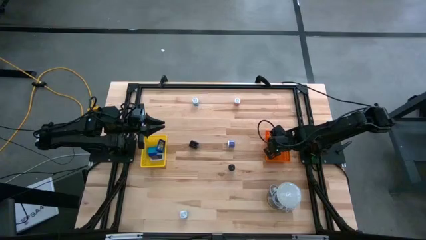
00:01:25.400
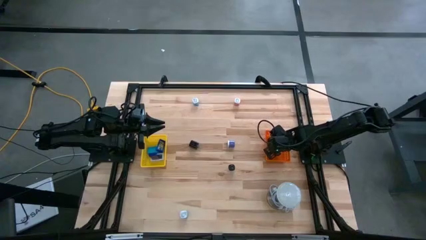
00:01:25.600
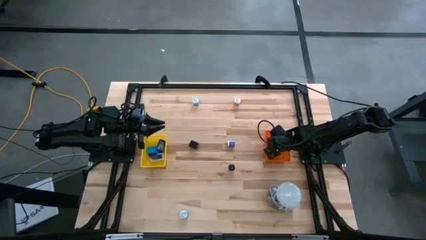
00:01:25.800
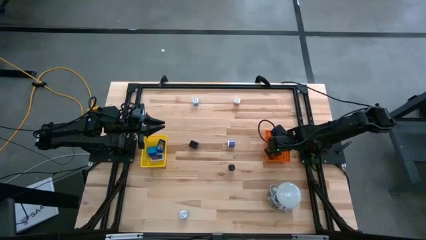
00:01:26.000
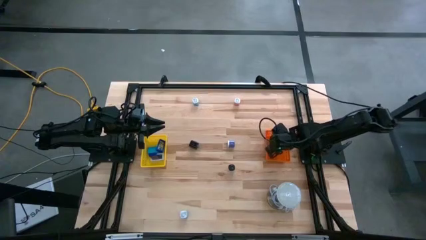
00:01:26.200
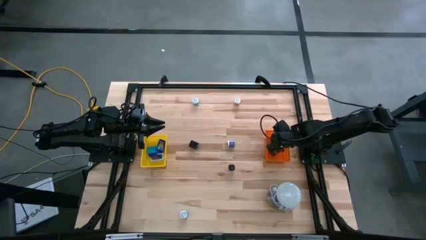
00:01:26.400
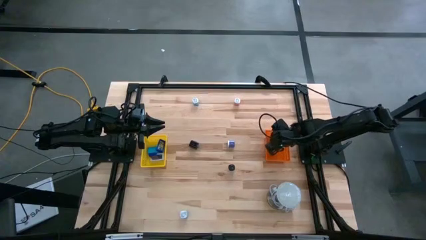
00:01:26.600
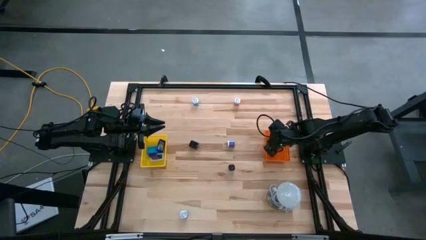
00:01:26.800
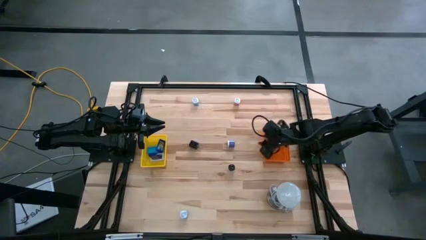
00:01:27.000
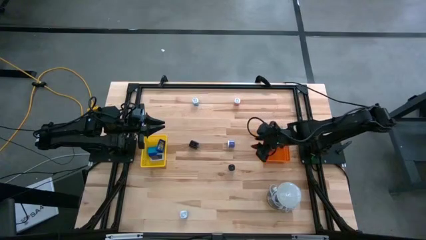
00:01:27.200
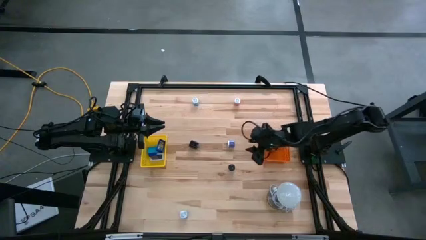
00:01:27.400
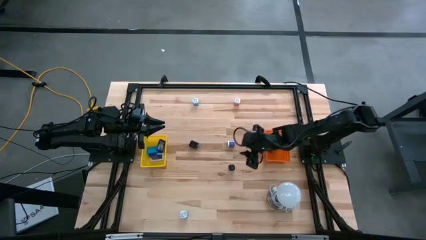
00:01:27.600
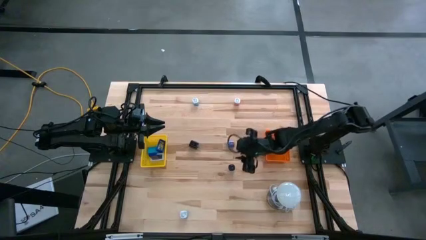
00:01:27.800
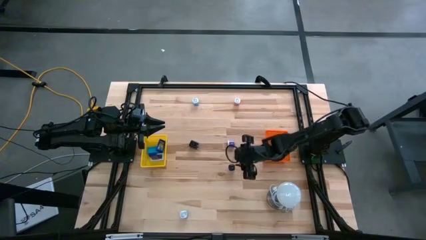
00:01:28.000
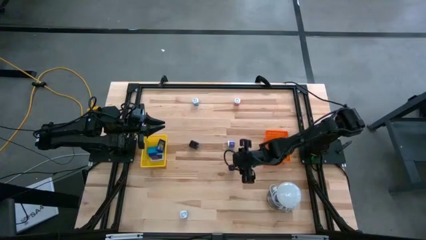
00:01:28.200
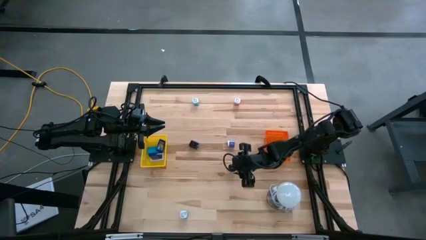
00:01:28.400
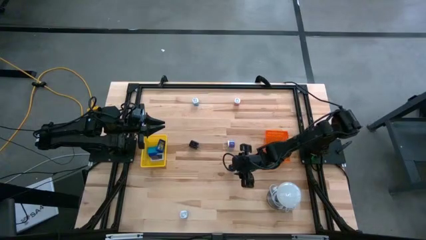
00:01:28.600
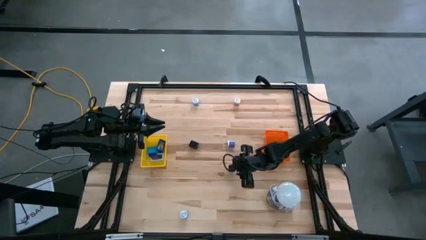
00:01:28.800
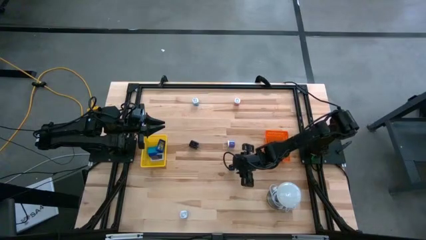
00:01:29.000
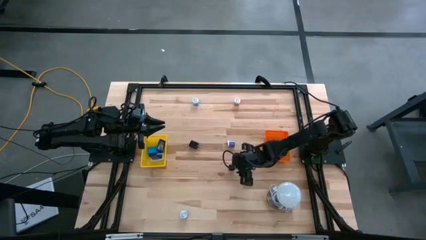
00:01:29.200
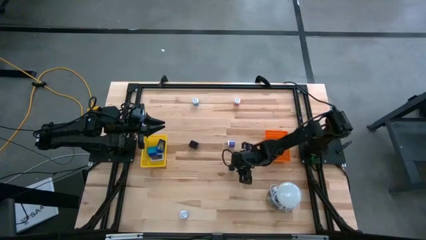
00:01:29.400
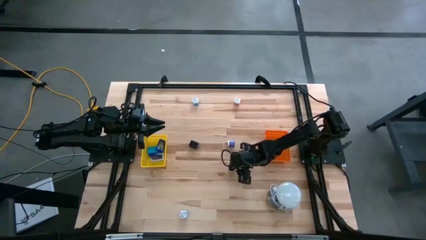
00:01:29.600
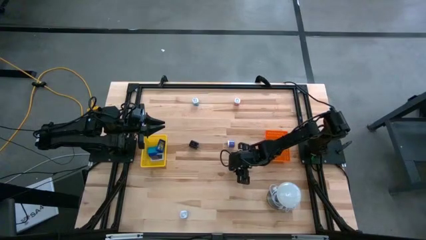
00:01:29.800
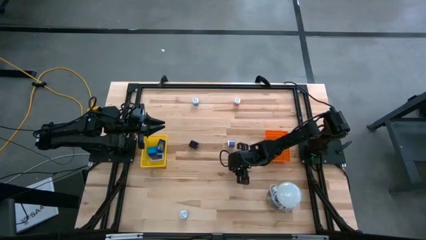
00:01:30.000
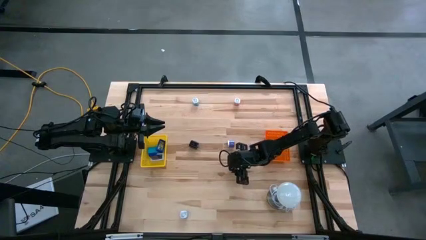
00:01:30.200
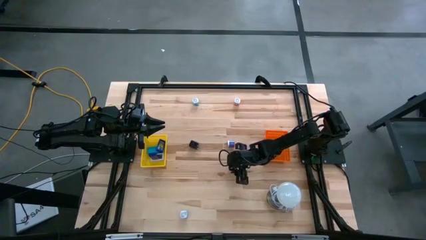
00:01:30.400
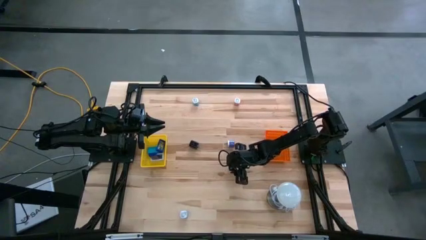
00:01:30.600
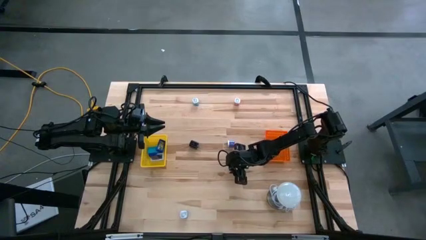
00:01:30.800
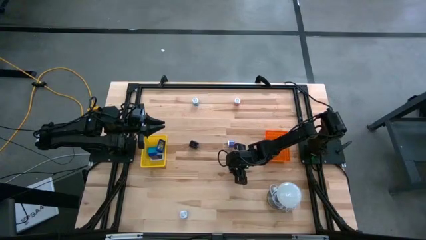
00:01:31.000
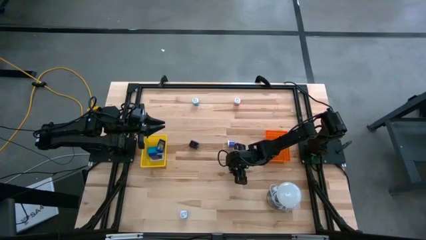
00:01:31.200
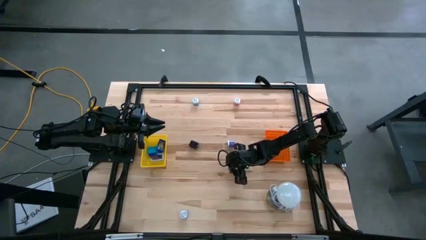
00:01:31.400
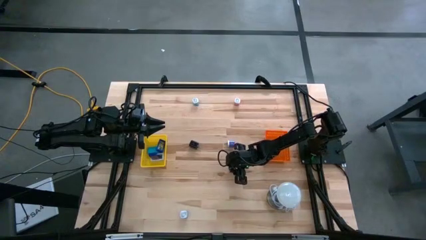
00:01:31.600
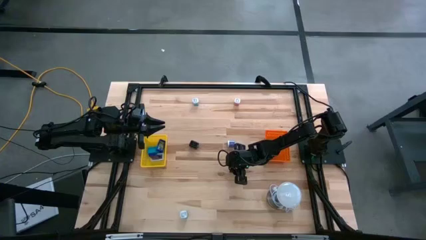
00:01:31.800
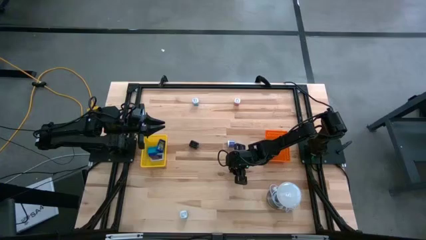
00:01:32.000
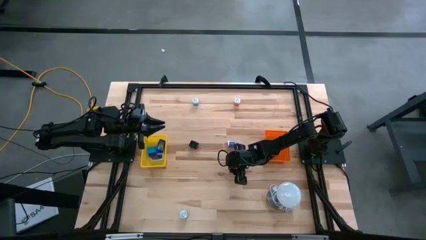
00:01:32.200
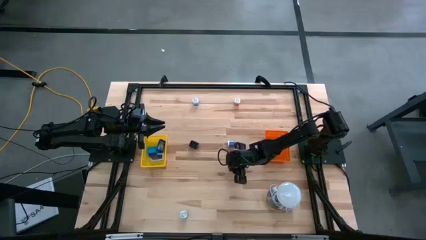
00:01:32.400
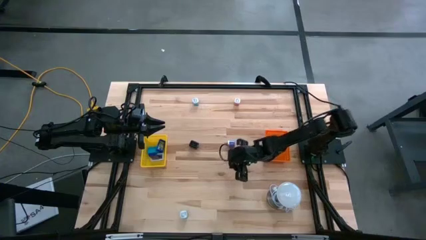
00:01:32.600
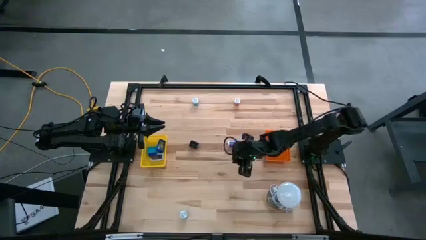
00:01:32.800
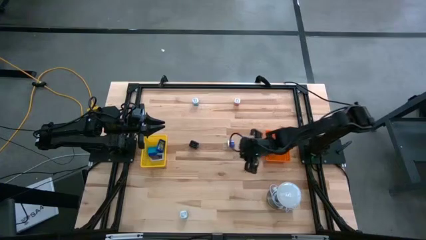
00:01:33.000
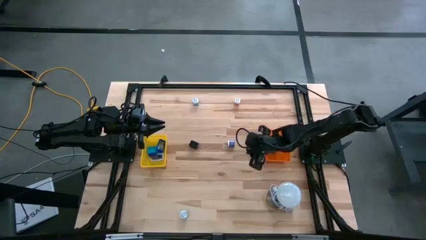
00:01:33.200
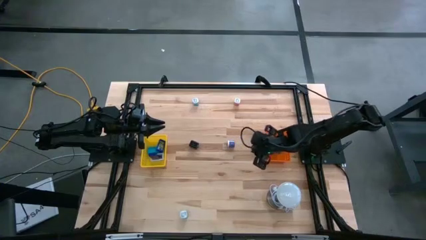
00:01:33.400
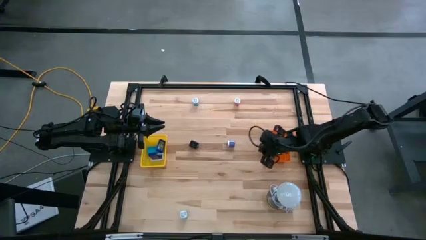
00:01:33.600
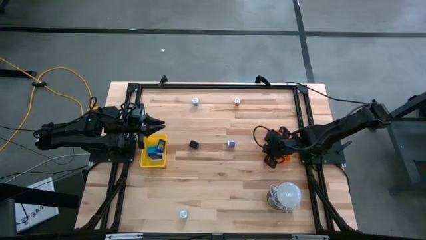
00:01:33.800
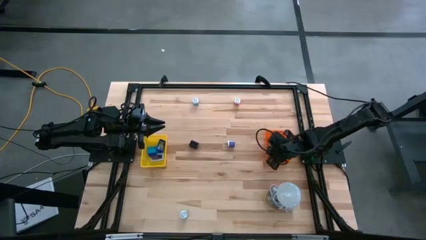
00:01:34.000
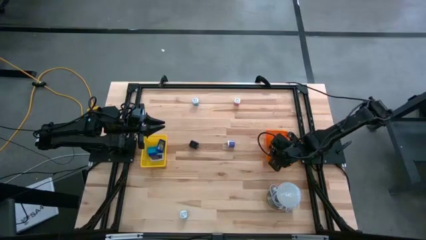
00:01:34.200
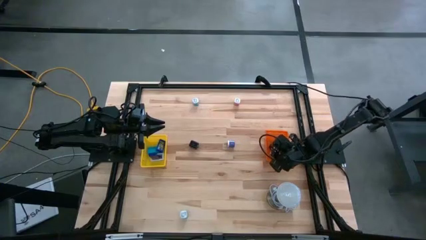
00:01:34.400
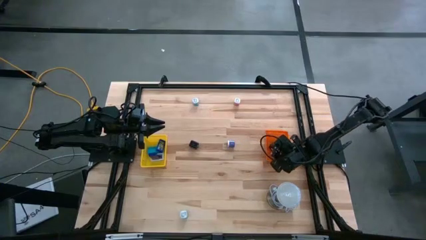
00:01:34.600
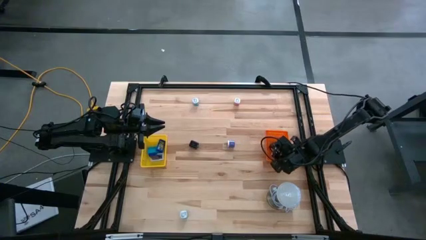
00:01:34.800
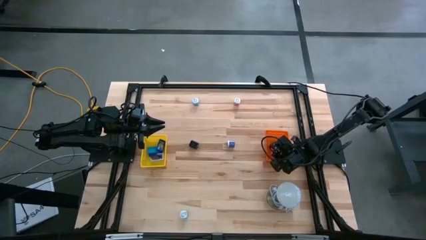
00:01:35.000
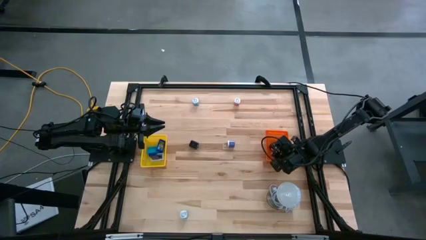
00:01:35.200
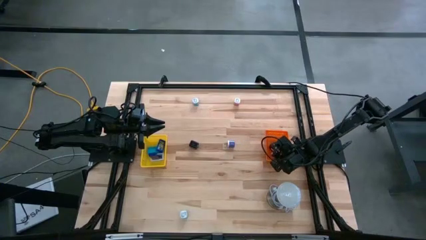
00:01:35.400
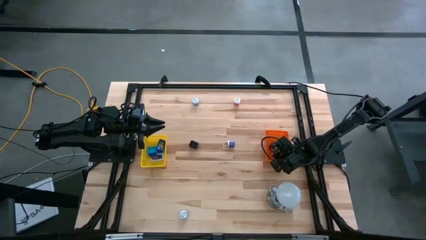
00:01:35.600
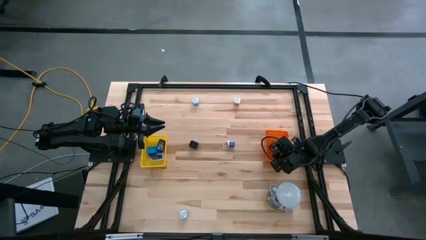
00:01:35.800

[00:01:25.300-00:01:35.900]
Task: Pick & Place Office items
Put the bottom black charger adapter into the orange bin

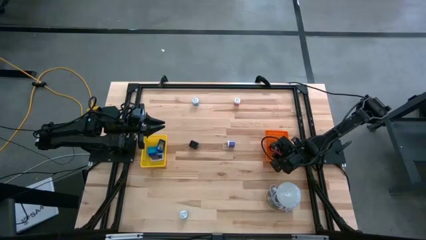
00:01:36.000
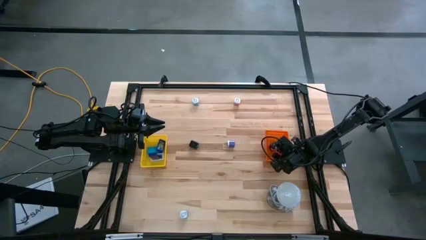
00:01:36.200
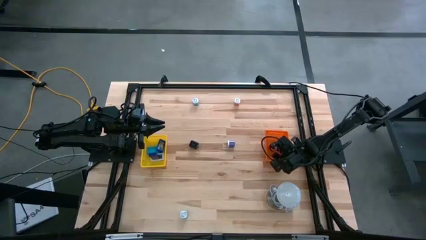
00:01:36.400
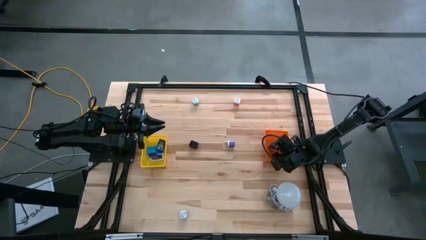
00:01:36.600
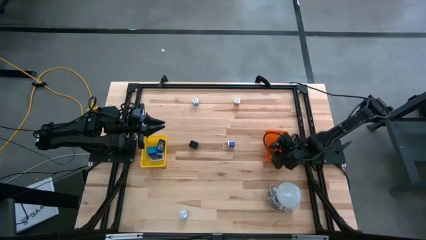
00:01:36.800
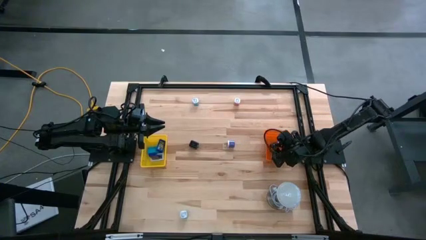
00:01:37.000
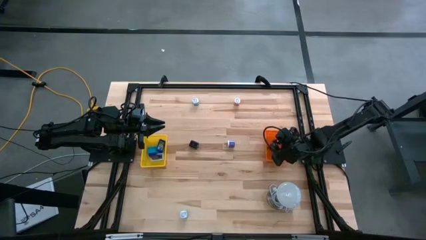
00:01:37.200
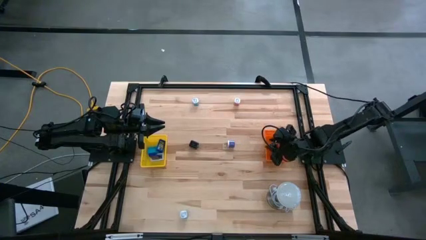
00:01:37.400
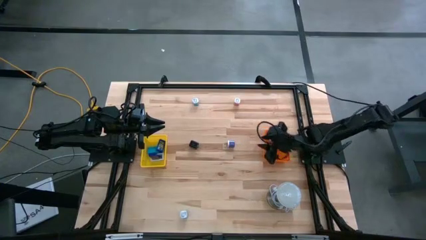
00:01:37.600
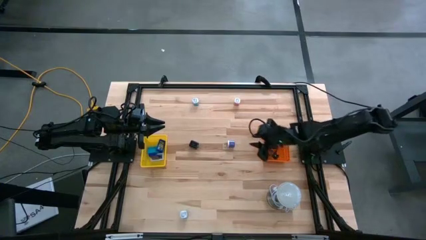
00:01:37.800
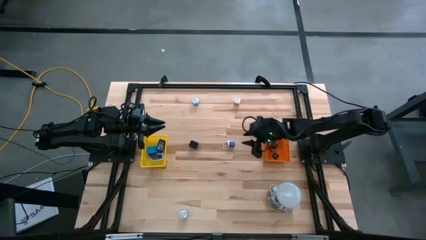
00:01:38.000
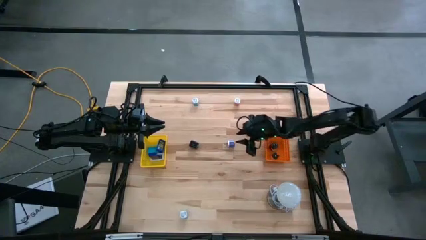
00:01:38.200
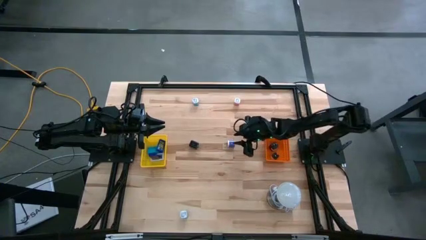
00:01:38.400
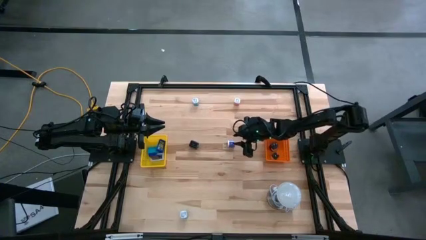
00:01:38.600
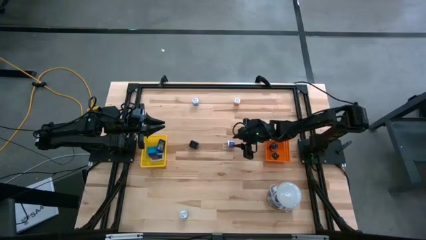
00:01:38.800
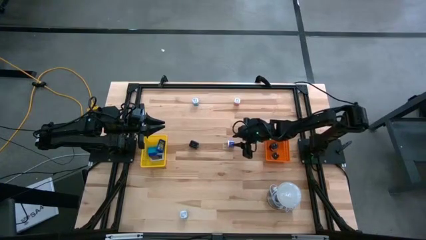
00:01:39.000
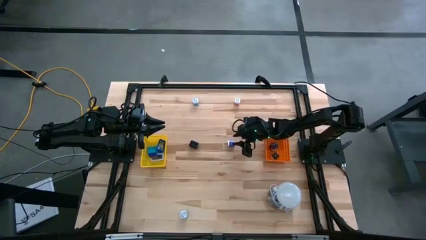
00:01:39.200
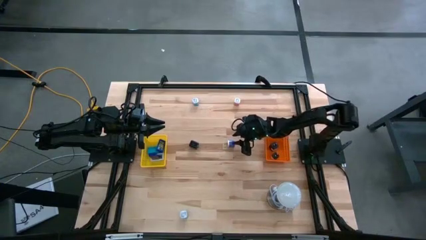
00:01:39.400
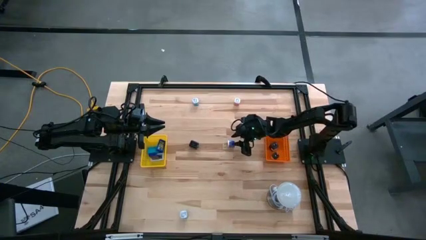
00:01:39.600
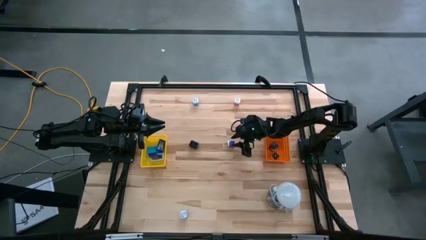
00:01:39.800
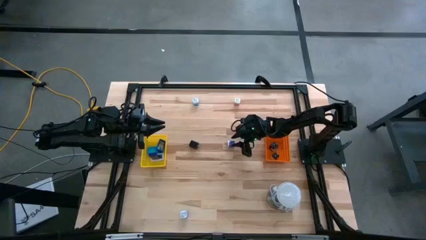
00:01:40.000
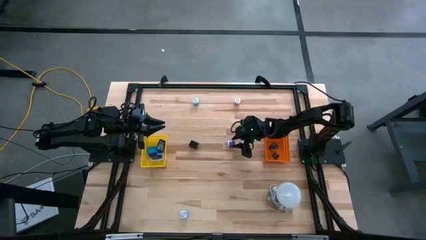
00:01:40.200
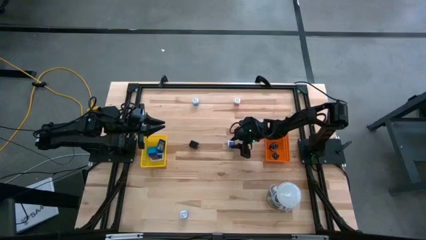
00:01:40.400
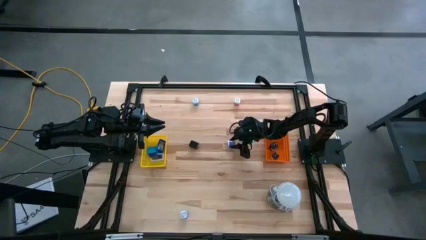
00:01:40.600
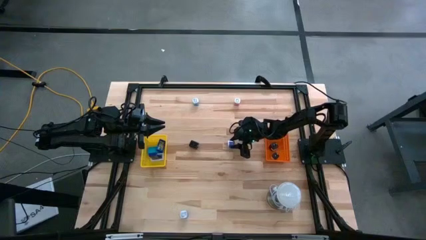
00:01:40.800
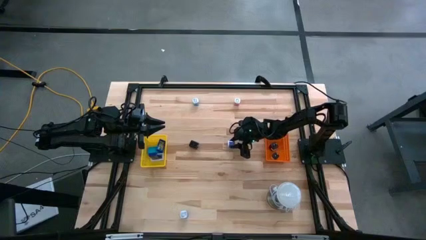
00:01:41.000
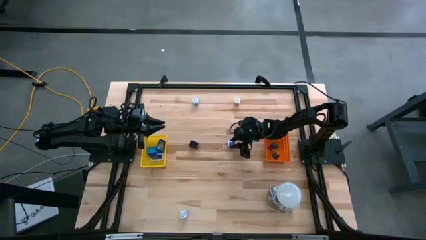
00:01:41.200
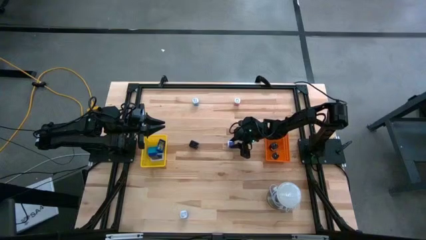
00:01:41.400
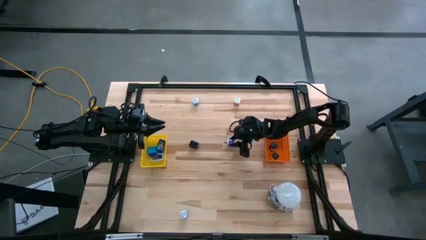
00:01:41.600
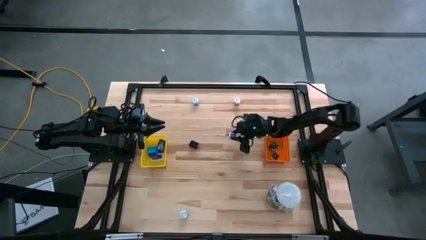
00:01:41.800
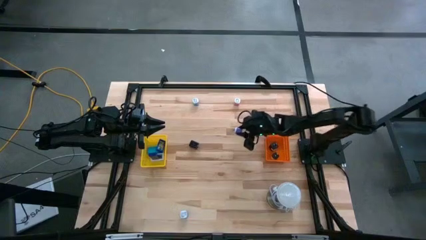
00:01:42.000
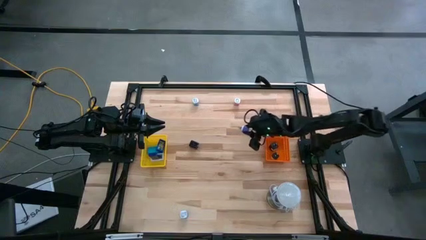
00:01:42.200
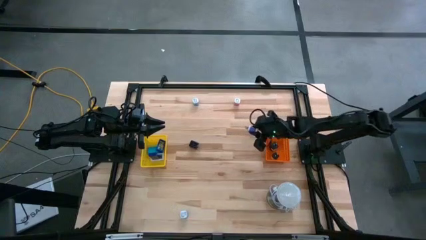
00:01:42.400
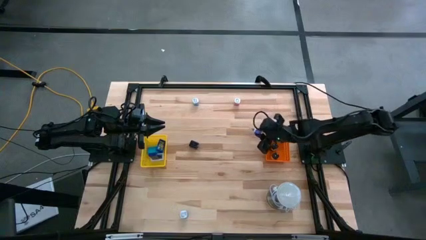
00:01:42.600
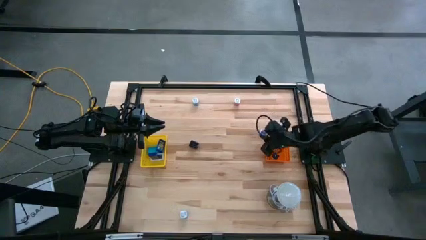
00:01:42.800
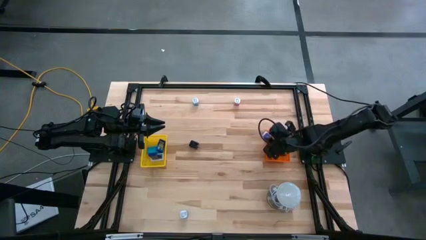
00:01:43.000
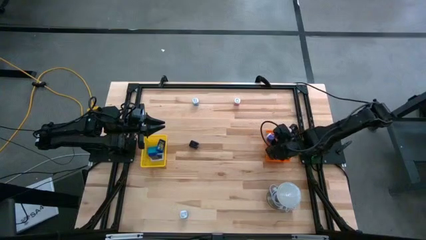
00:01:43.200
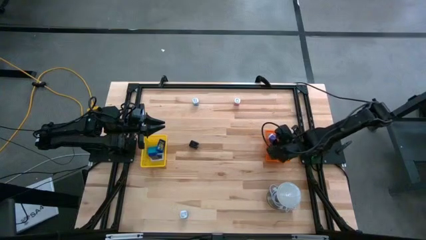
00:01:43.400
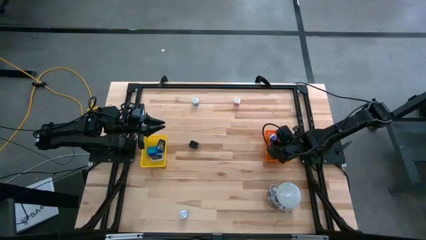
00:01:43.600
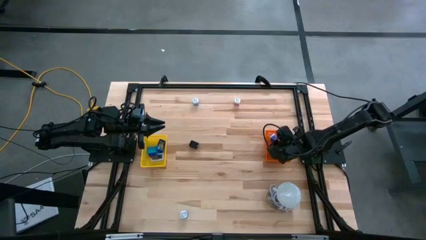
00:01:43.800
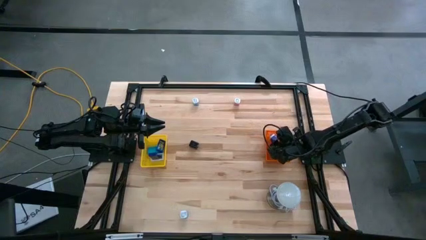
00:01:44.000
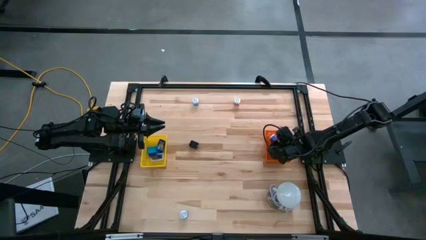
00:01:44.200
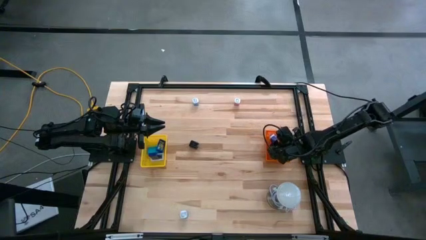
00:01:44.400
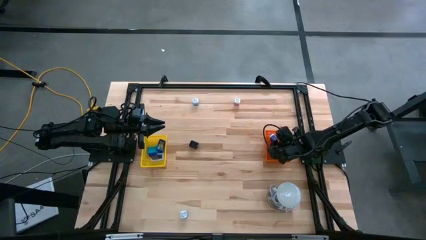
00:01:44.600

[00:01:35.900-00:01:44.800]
Put the purple white charger adapter into the orange bin
